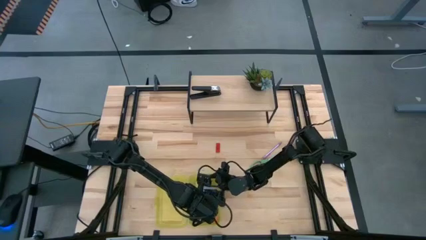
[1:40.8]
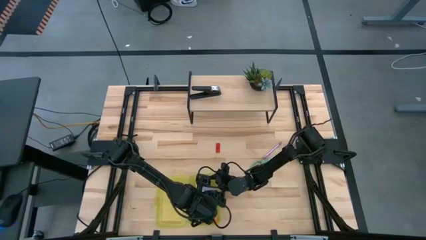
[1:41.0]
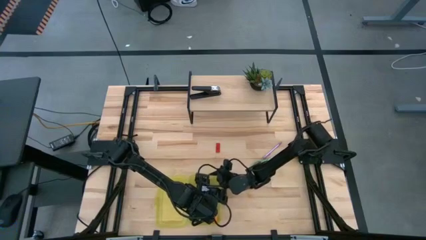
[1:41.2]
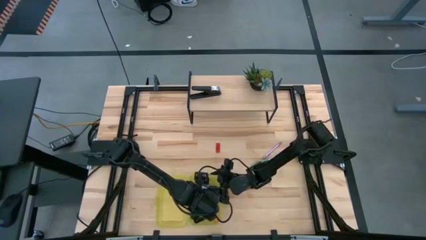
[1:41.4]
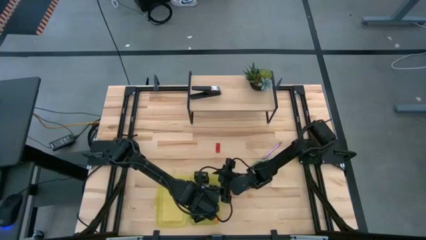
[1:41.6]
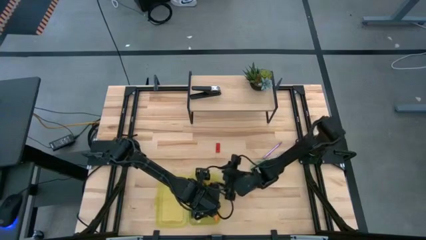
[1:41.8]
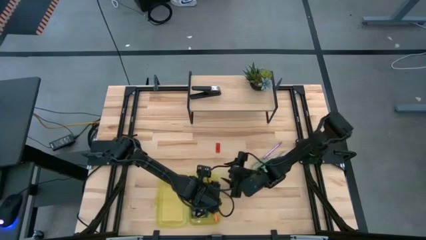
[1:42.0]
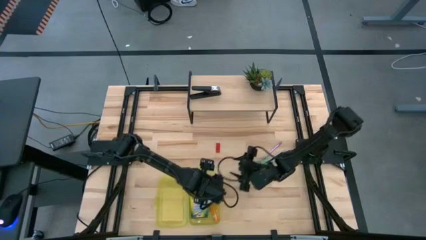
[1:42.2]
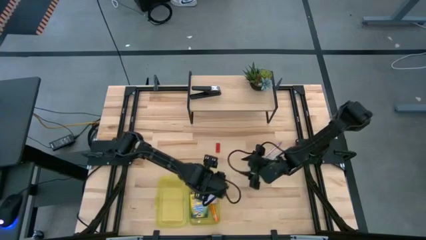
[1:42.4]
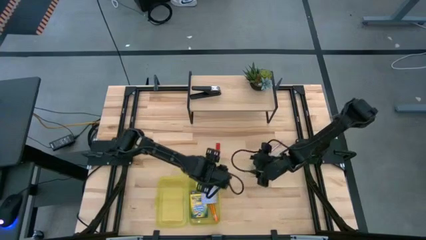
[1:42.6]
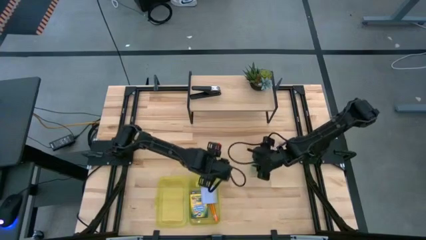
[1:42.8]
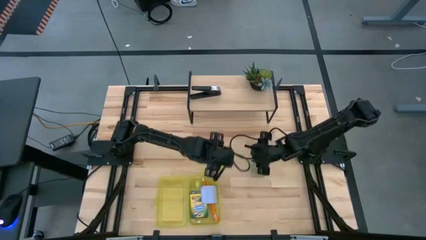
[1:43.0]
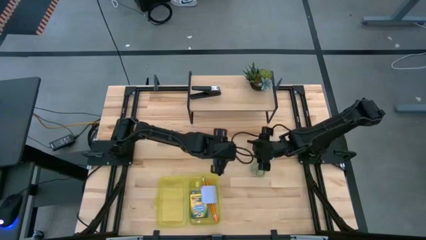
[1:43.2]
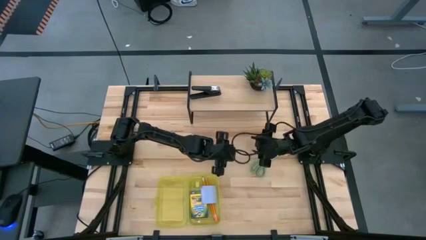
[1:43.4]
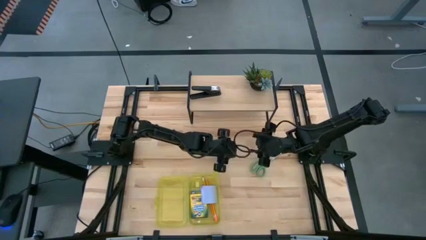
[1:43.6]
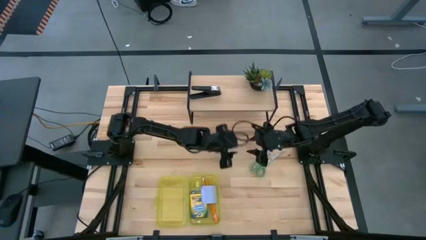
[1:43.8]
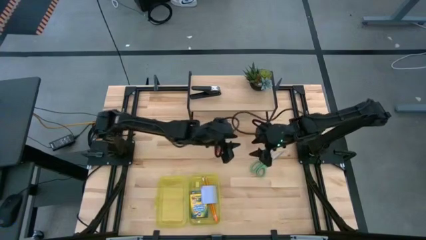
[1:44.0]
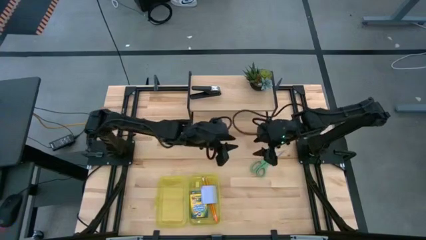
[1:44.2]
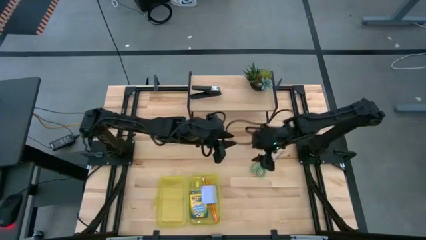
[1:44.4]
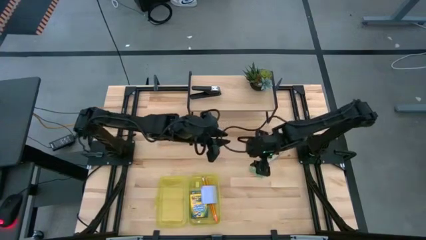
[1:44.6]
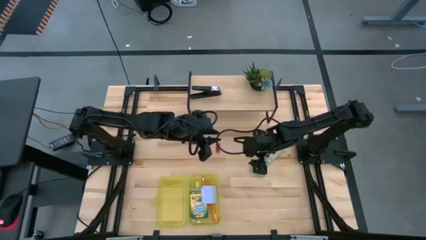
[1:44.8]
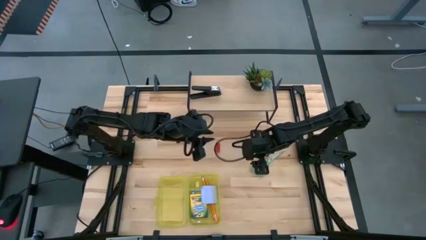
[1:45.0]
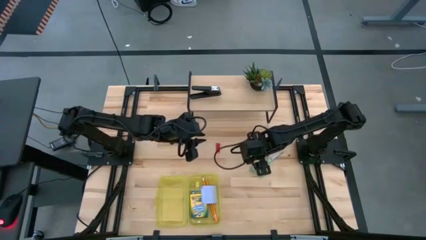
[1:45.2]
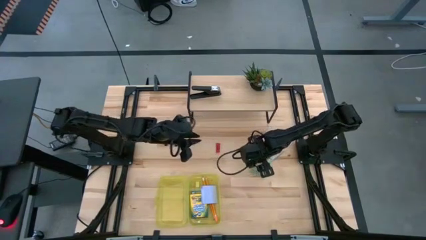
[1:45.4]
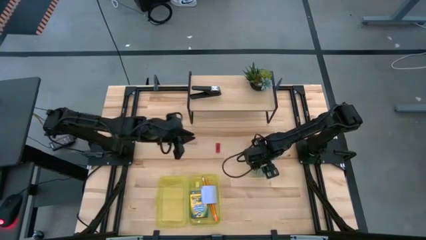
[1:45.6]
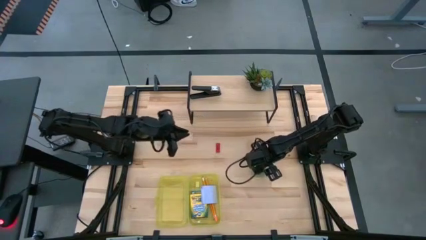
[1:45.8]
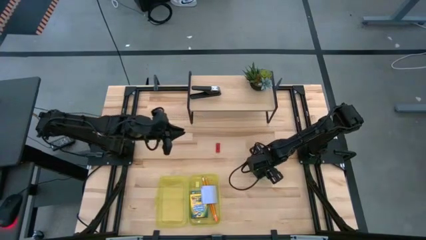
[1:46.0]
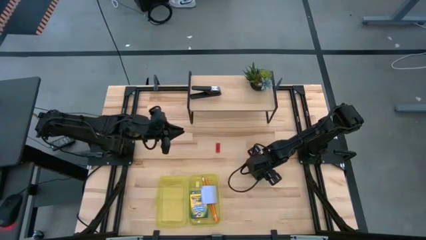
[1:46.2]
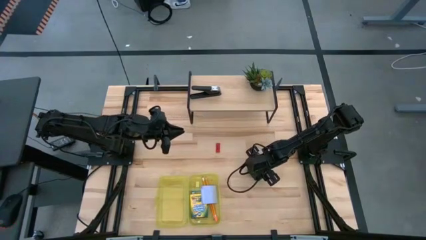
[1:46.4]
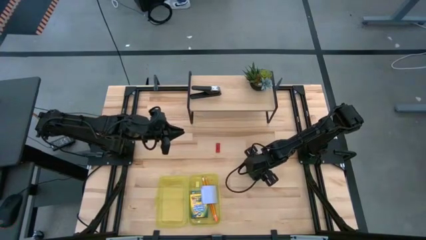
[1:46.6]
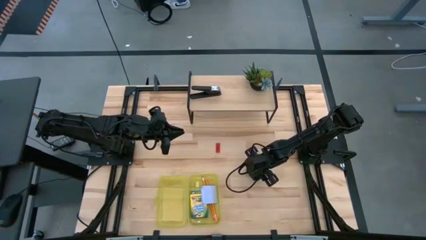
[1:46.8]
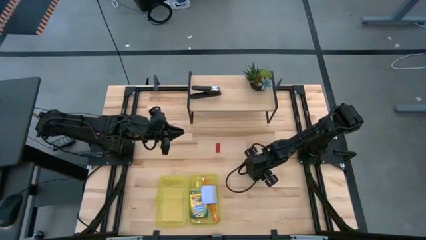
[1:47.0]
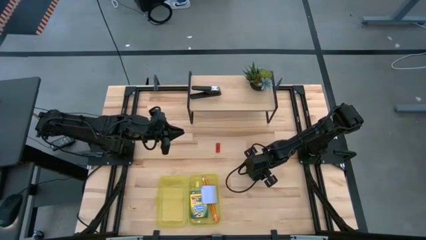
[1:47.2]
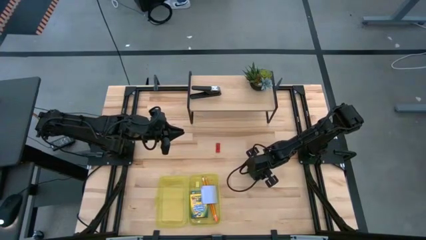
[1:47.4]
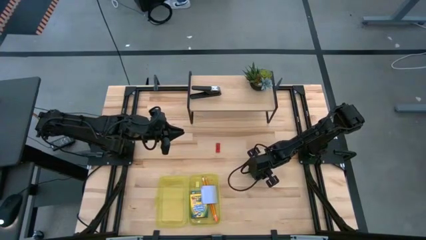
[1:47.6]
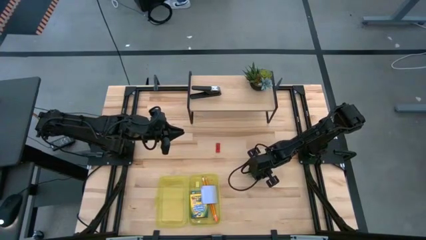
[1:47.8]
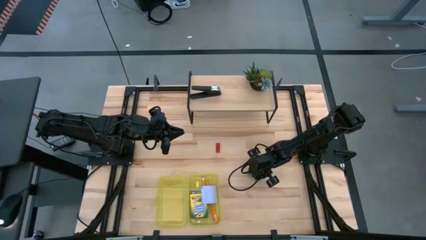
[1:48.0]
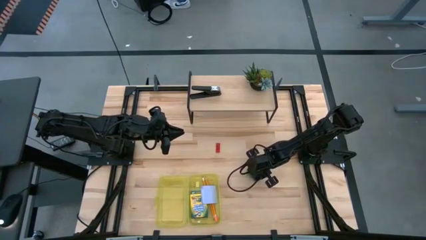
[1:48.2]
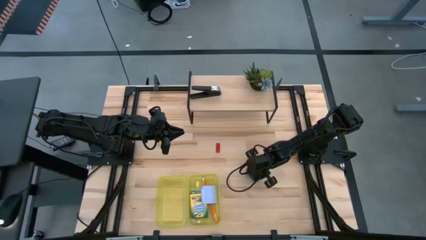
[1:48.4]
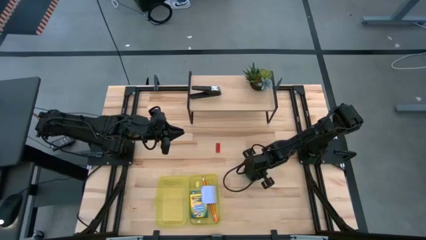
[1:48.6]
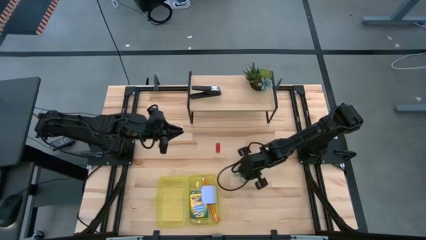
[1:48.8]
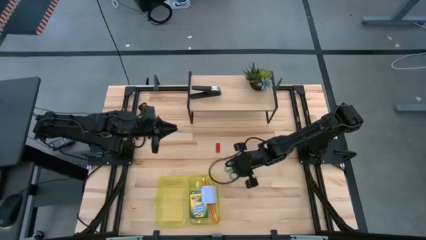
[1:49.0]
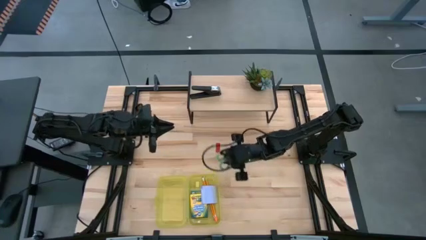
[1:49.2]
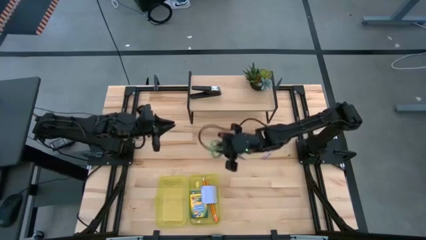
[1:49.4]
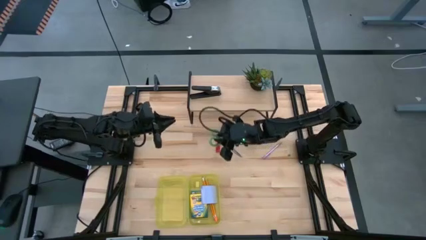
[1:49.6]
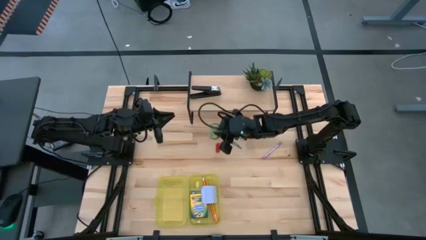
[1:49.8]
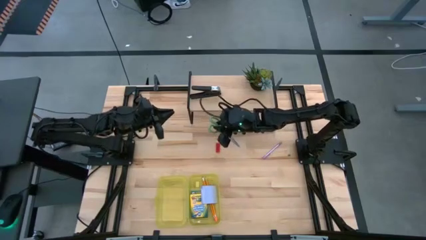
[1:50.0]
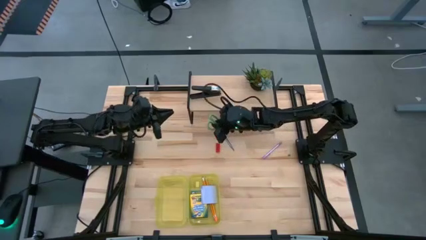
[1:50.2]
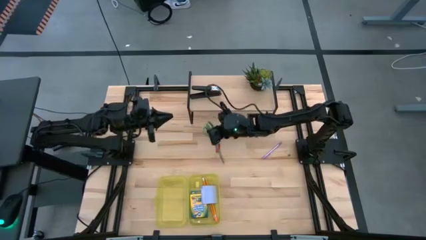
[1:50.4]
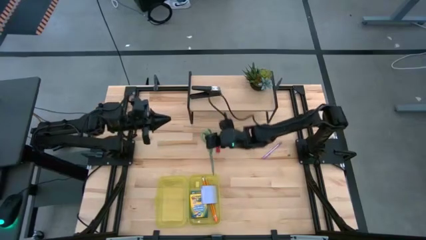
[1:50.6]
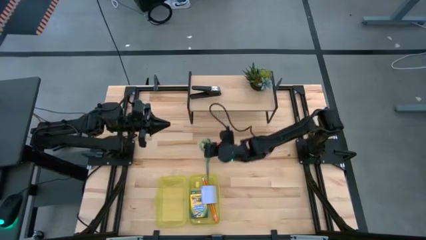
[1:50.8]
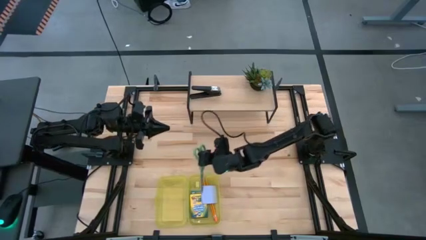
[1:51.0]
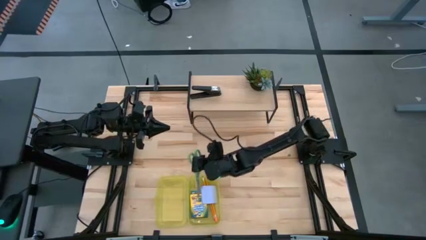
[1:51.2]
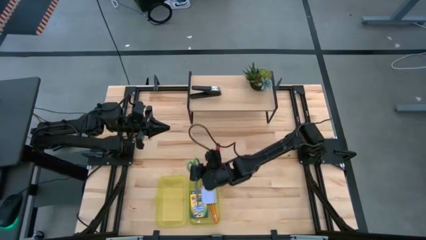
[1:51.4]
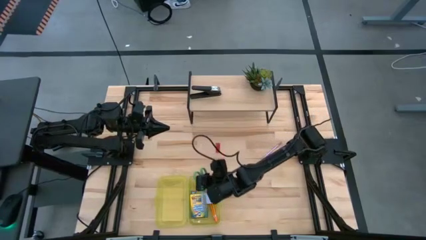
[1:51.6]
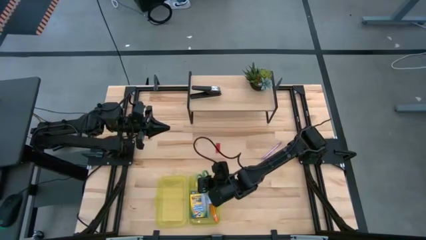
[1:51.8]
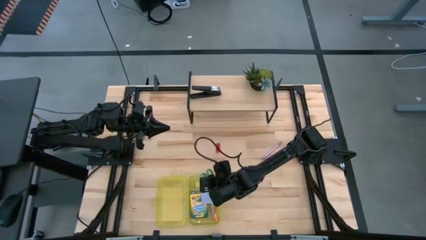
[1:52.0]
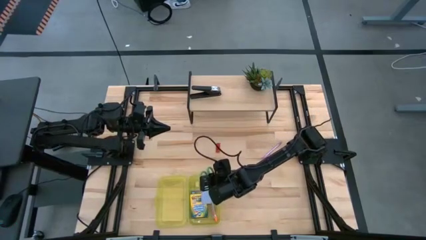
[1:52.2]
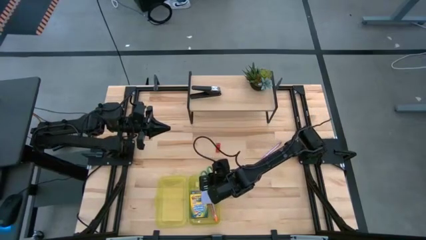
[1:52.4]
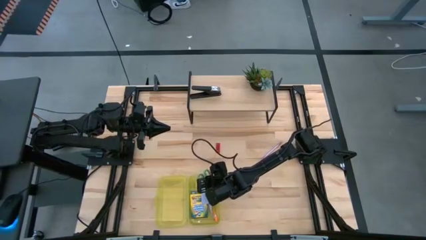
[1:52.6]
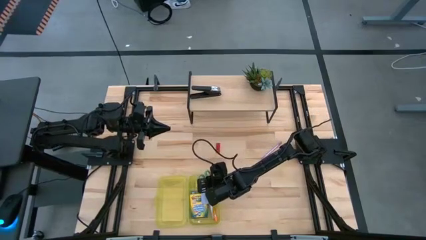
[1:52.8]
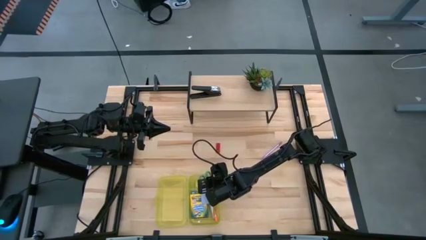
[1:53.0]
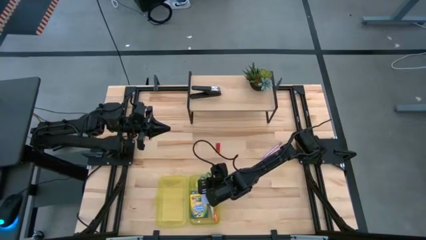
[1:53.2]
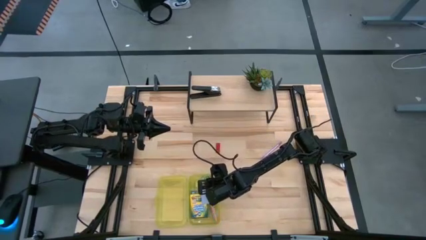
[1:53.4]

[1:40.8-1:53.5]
Task: Pack school essentials
Put the green scissors into the yellow supply box
